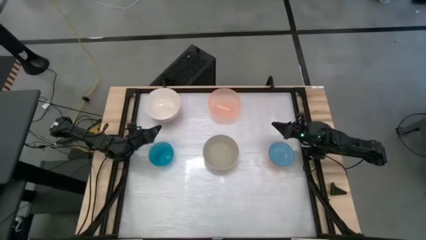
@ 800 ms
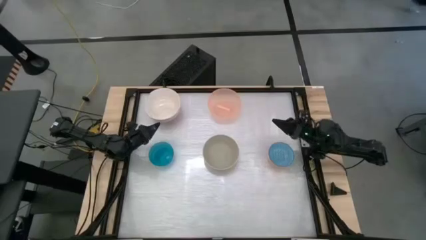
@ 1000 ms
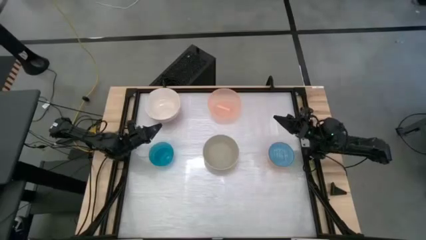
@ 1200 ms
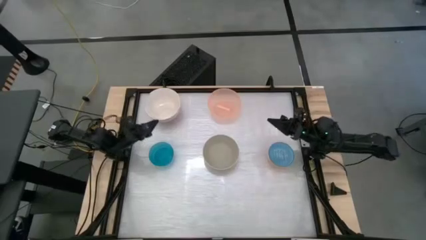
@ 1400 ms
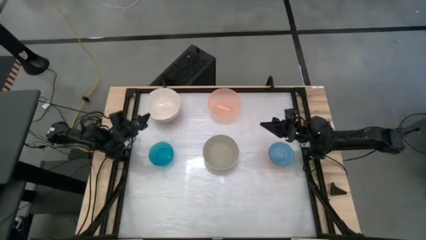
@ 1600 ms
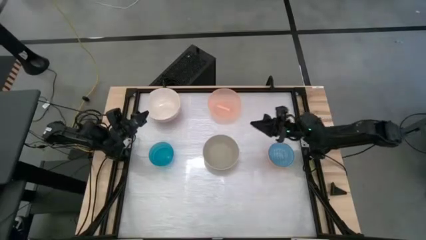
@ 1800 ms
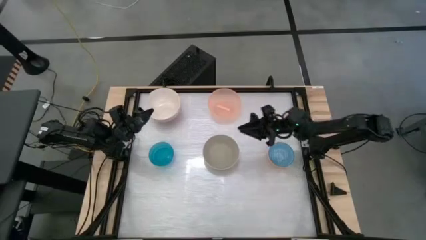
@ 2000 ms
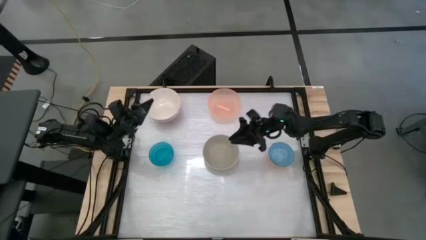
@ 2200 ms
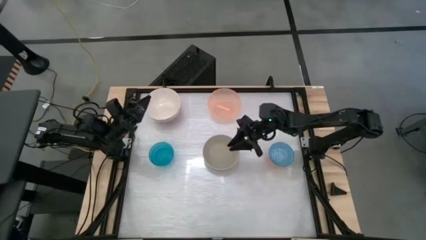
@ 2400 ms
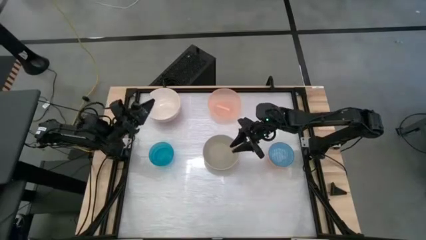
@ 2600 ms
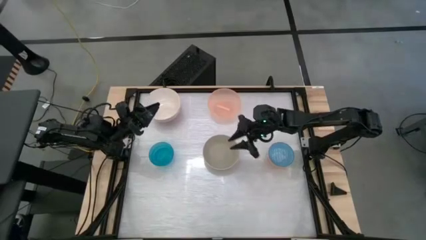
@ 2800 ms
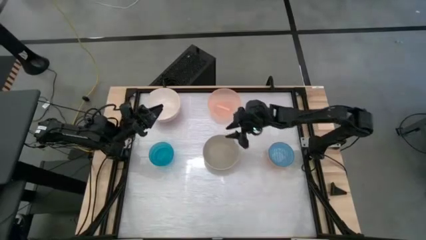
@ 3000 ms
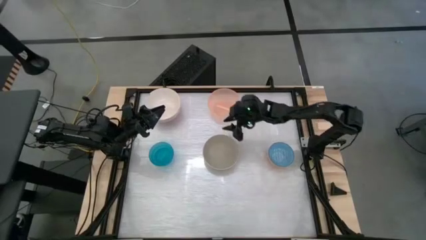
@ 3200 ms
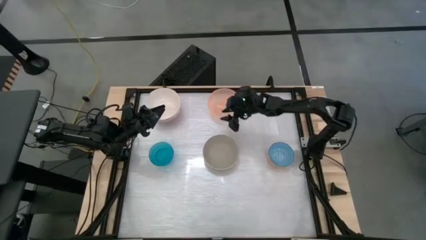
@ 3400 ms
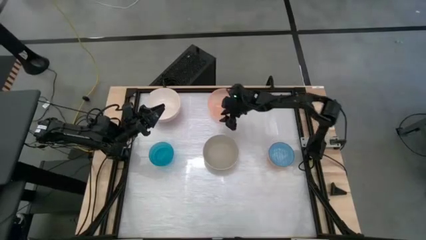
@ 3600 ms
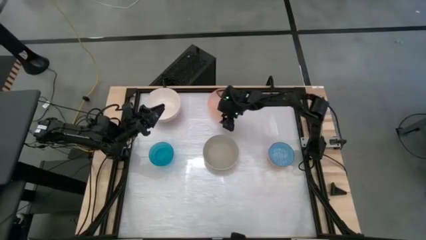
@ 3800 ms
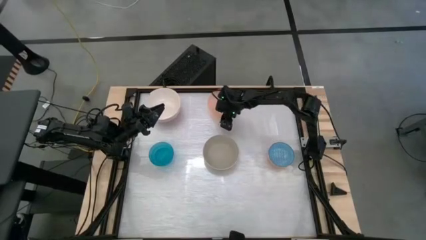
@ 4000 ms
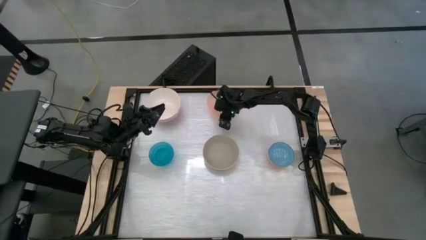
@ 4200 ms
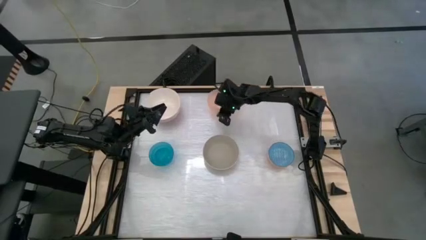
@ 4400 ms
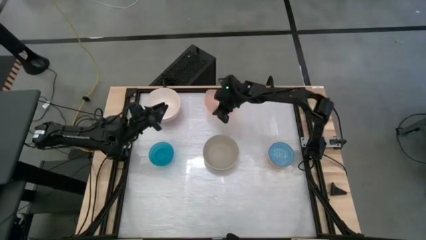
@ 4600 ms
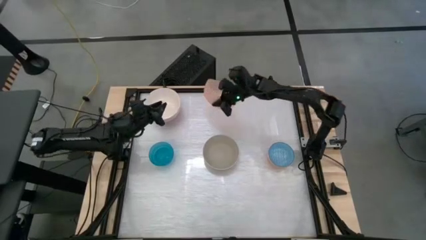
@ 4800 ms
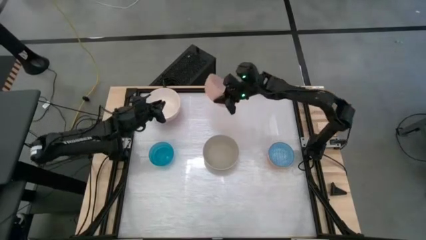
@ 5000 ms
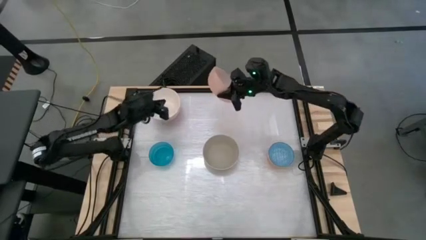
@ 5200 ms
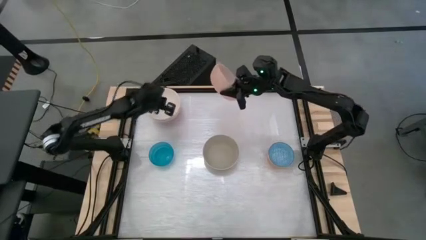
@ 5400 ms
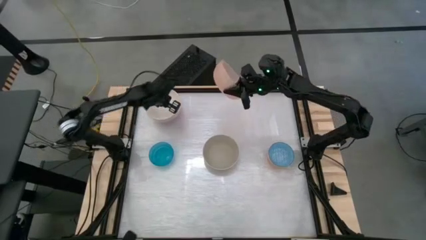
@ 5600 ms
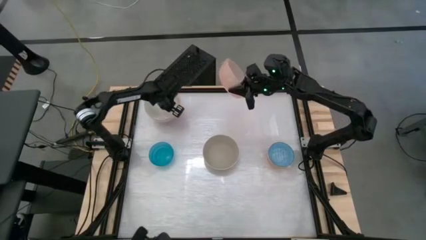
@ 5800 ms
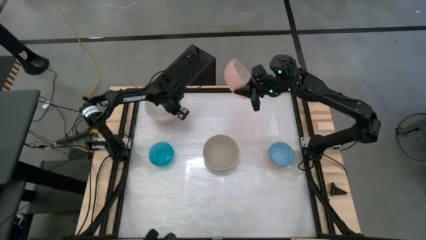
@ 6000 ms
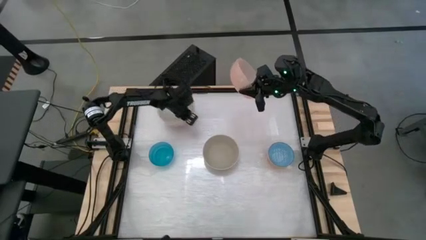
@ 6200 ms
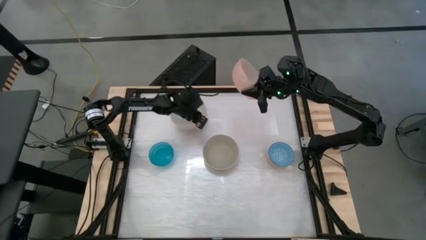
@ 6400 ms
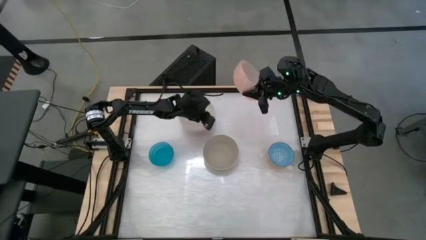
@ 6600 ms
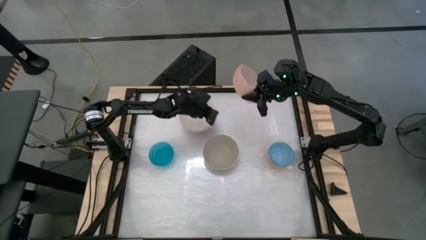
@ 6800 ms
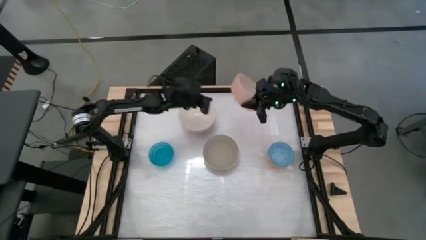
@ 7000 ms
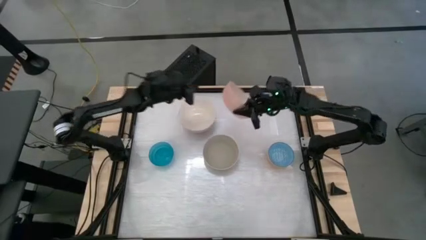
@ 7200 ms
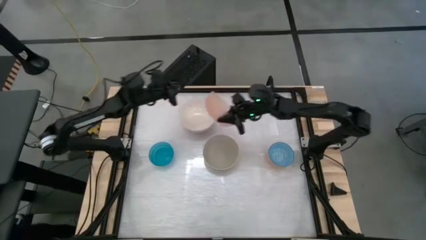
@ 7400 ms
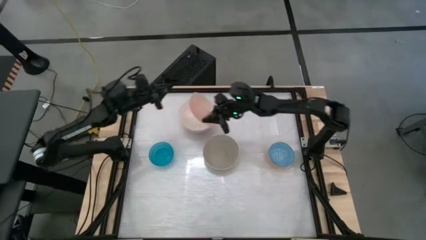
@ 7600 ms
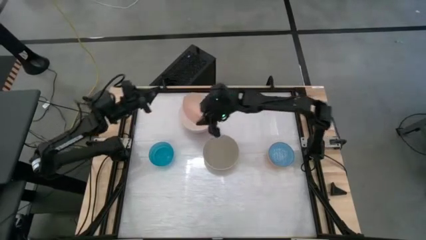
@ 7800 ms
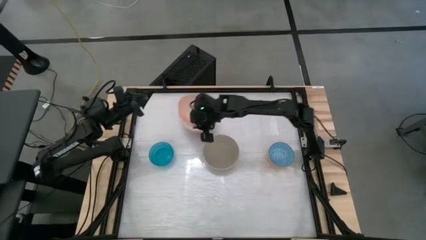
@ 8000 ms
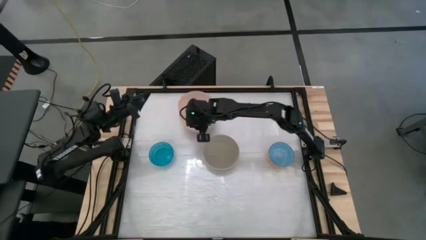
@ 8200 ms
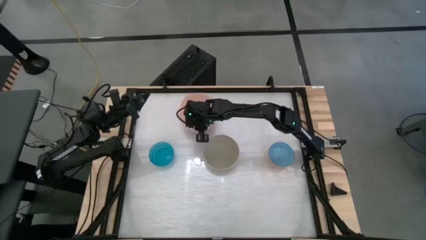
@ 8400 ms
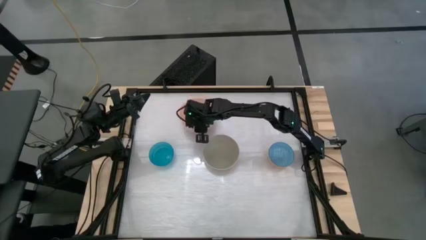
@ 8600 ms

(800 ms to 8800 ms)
Stack the orange bowl on the white bowl

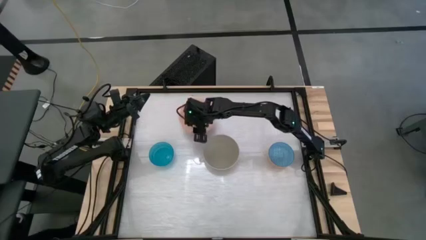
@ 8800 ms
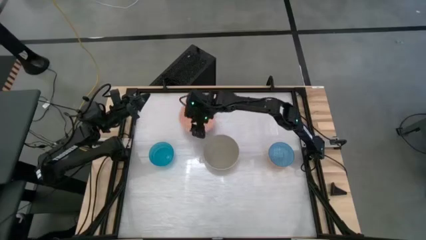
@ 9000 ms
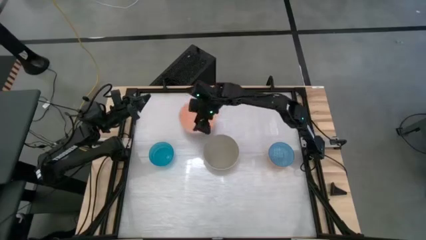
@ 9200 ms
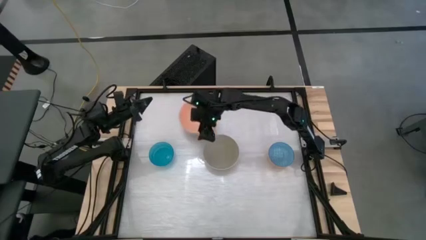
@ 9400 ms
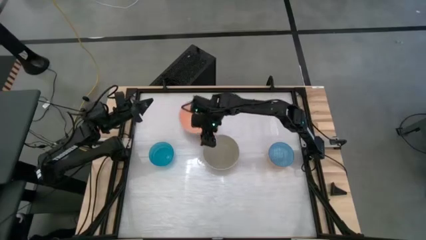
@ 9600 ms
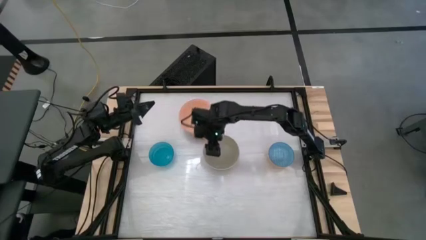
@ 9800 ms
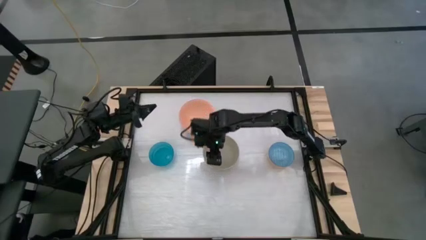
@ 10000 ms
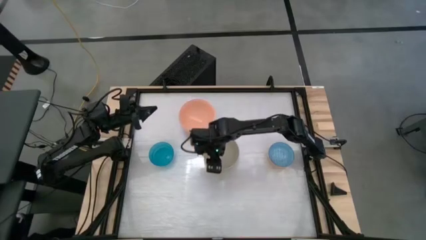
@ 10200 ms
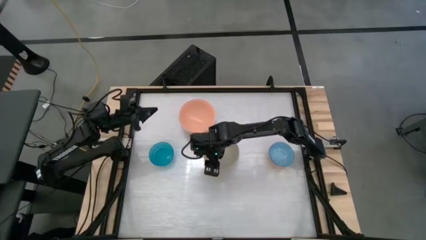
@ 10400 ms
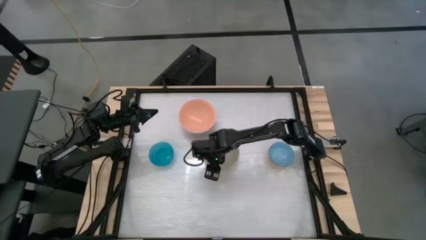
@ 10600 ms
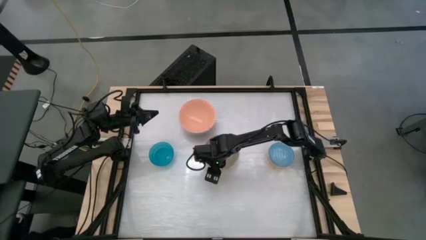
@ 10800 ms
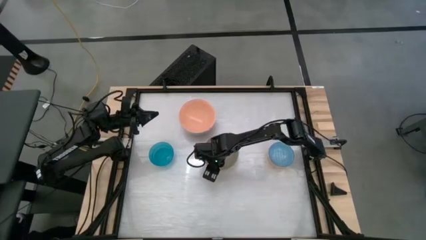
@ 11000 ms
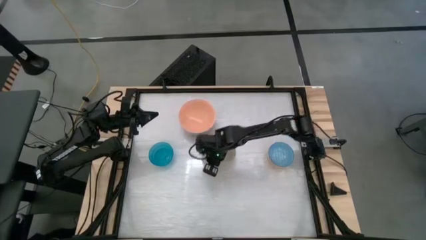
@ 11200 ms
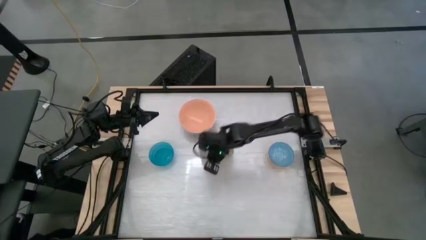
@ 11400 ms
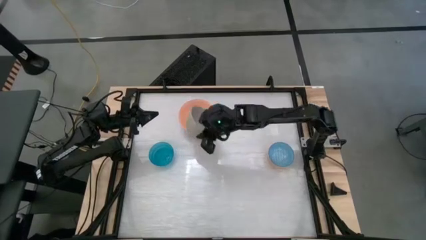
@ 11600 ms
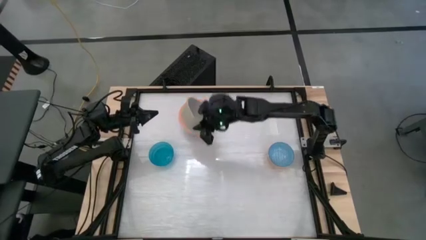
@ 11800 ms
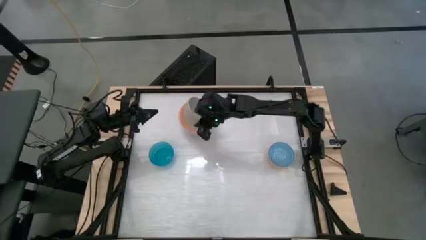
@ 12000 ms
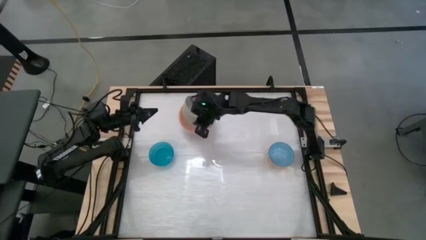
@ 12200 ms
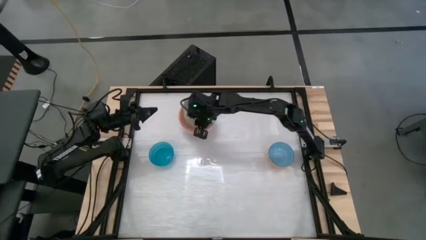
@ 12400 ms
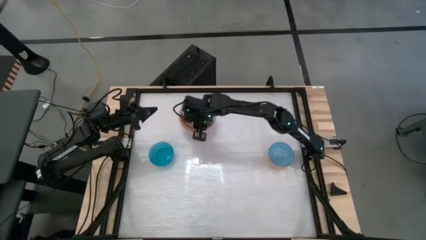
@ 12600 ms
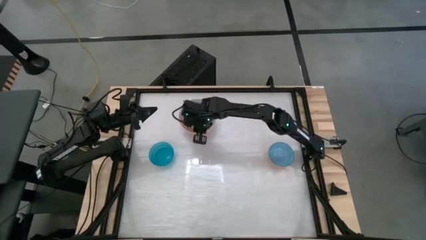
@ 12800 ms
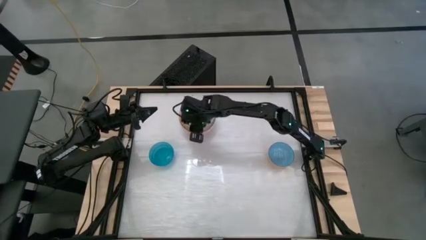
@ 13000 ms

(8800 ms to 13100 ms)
Stack the off white bowl on the pink bowl

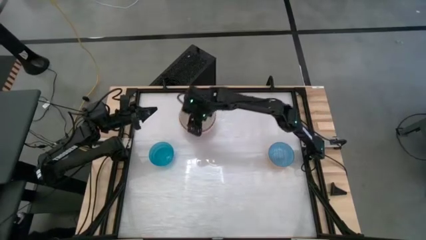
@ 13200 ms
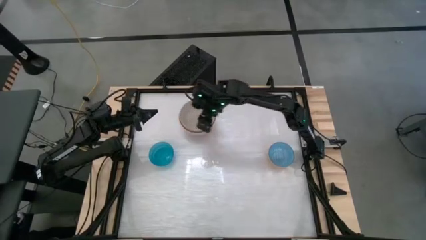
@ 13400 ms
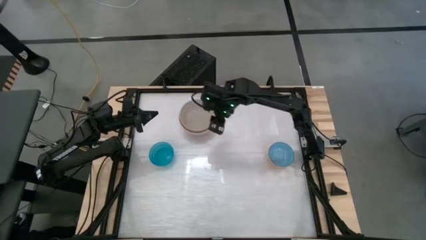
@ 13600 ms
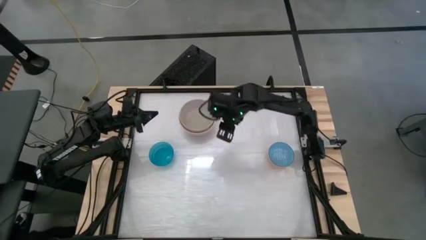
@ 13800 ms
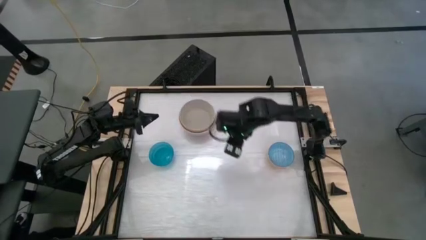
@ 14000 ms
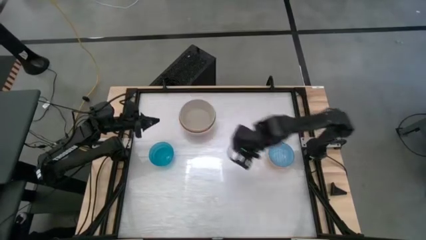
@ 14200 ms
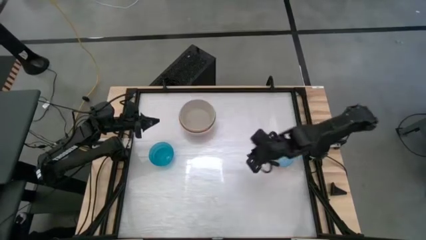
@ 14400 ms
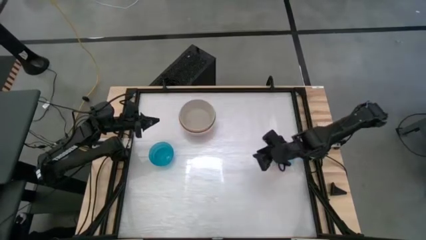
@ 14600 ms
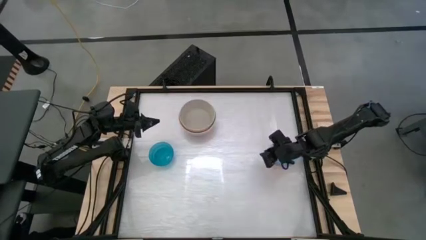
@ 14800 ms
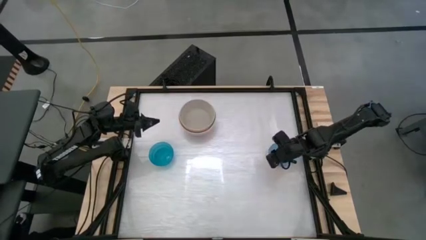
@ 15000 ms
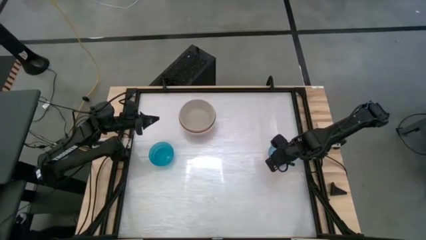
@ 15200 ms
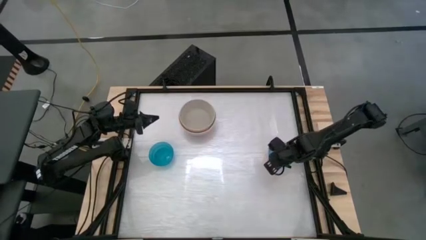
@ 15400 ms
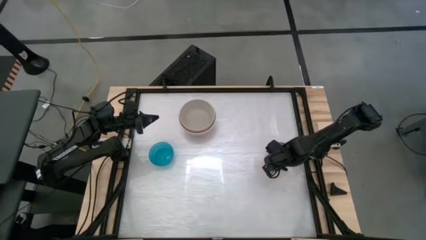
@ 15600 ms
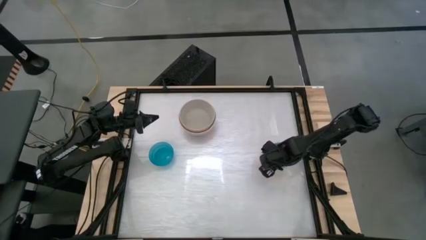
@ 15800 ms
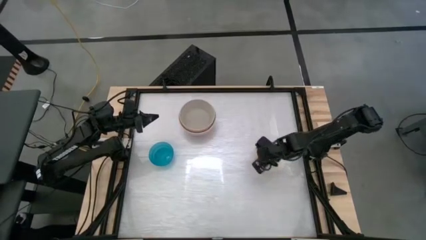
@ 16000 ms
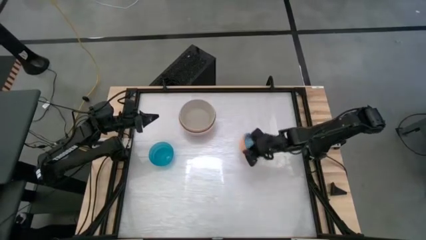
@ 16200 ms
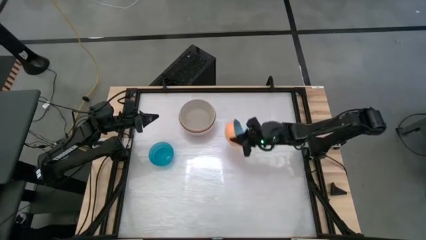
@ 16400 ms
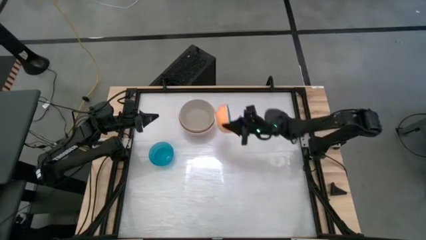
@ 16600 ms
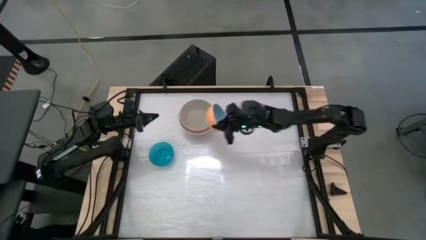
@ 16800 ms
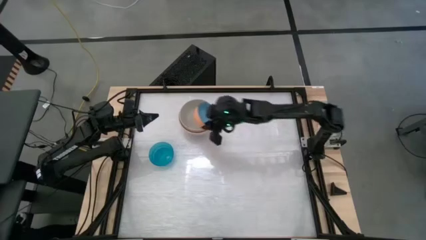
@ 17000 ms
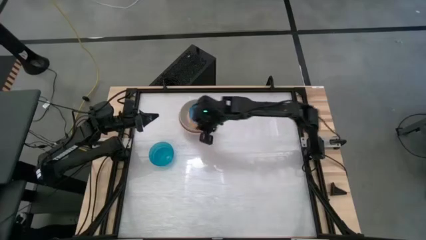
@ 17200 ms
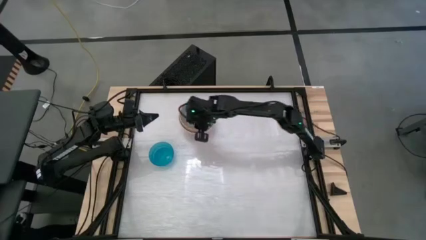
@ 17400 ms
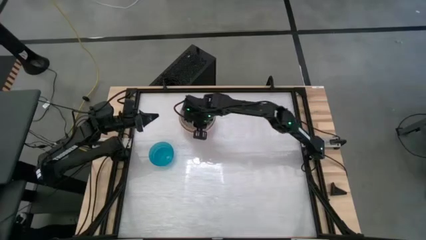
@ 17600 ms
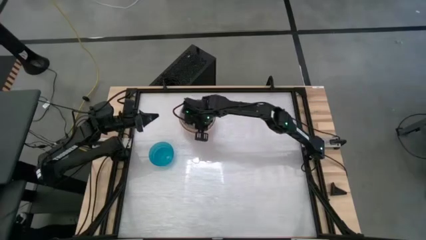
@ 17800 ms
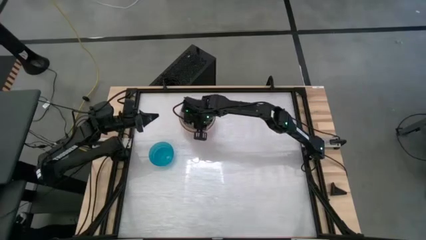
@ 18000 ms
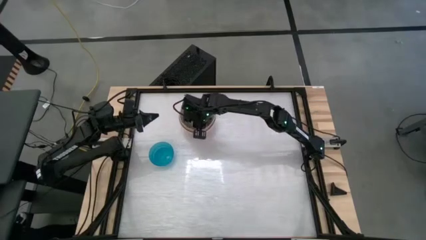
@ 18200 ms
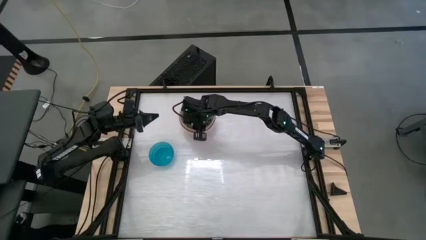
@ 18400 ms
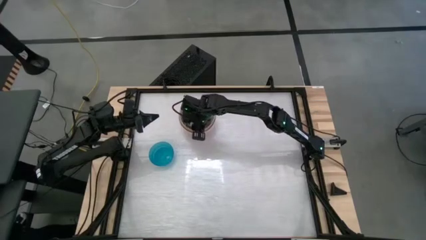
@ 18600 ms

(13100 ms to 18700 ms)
Stack the blue patterned bowl on the off white bowl
